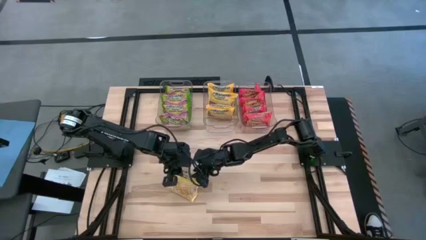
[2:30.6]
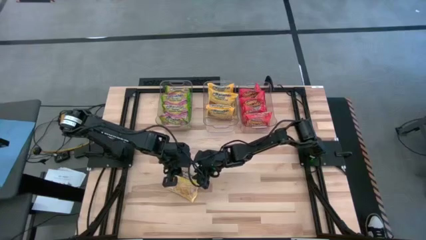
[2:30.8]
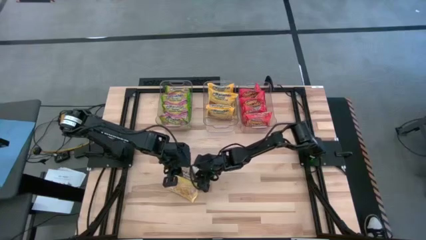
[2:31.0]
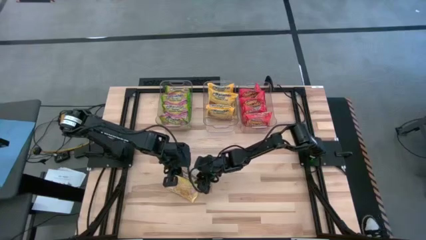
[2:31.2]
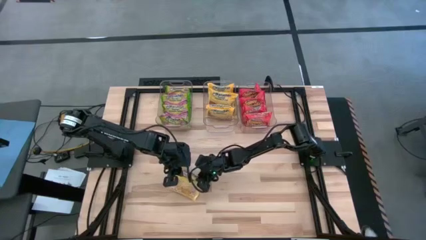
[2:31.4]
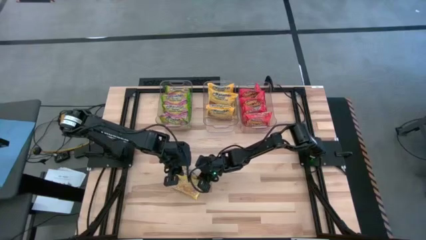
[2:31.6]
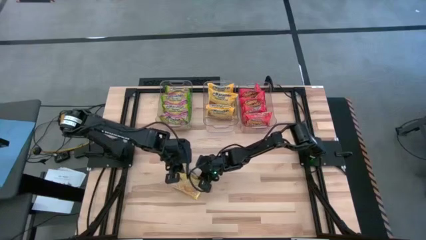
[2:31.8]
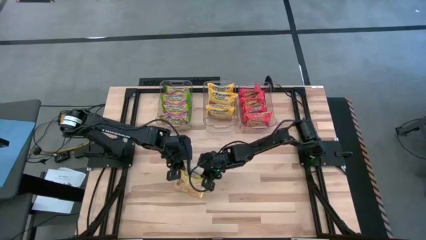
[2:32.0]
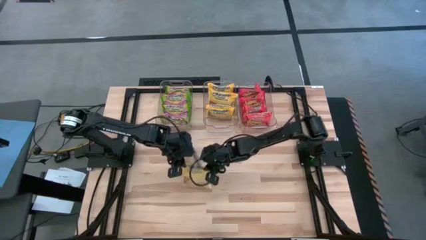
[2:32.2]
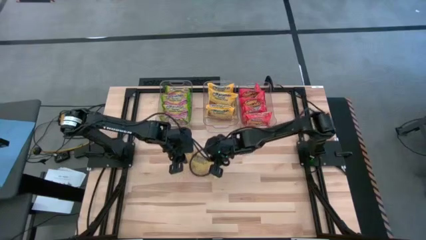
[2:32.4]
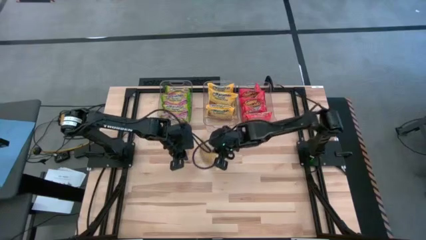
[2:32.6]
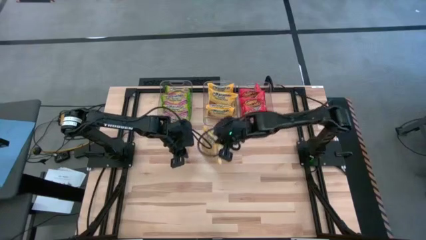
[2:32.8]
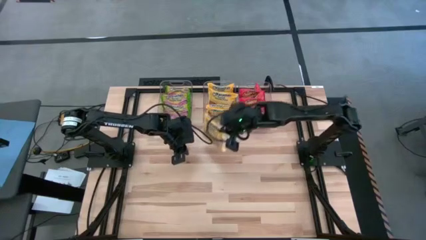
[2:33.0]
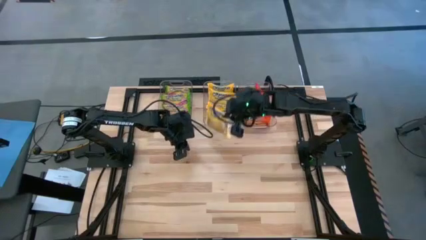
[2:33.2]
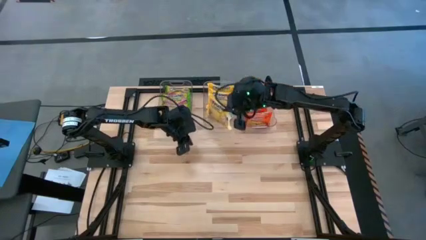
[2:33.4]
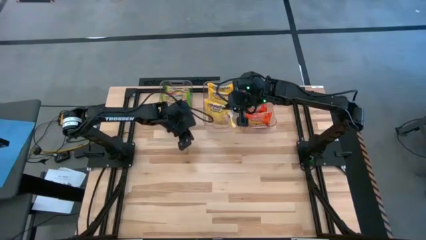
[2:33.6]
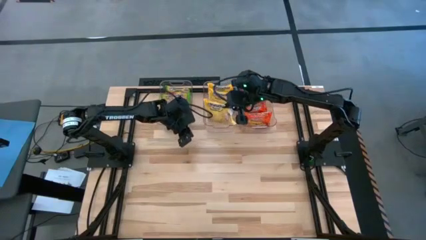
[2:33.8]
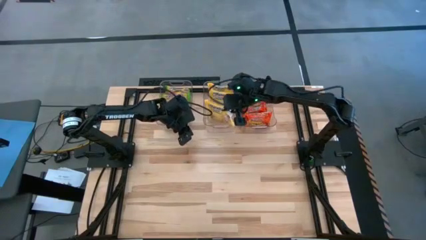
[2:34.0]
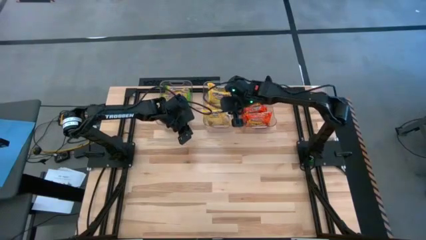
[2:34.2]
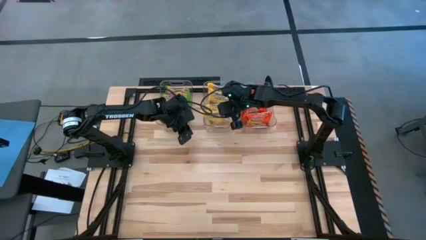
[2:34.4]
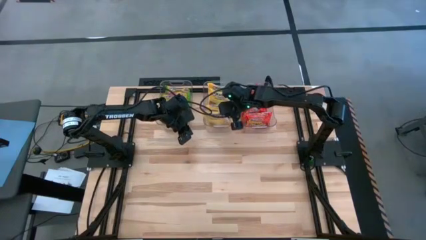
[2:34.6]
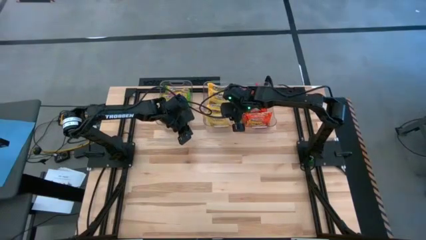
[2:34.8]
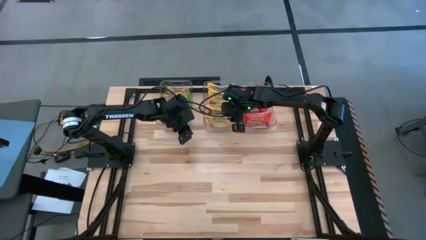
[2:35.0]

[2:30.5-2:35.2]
Task: Sort Maruchan noodles
Put the yellow noodle pack into the middle transparent bin

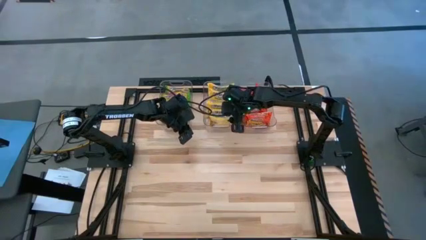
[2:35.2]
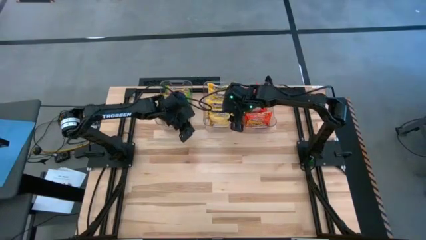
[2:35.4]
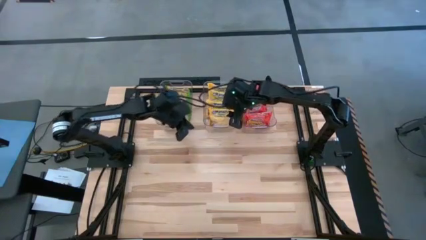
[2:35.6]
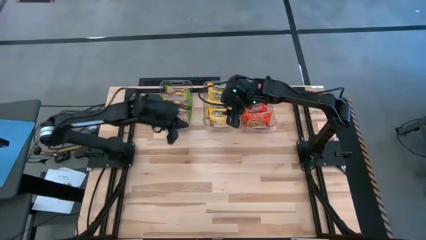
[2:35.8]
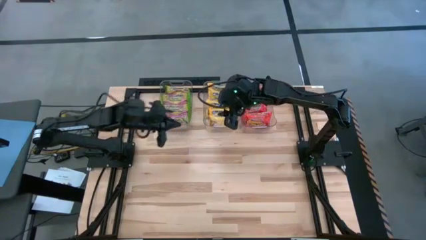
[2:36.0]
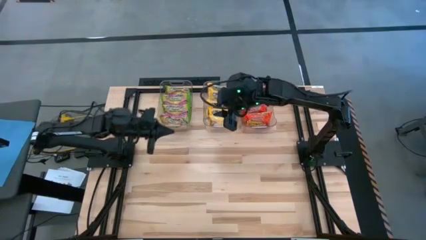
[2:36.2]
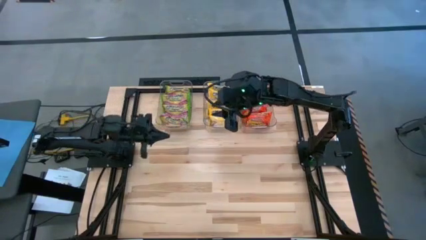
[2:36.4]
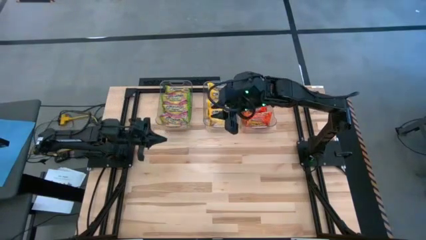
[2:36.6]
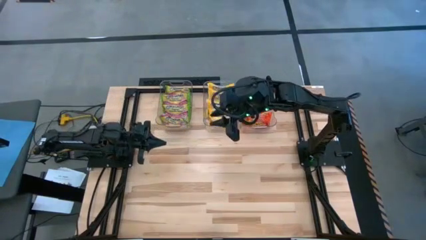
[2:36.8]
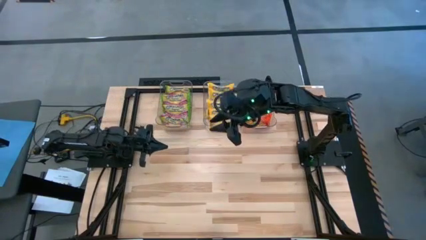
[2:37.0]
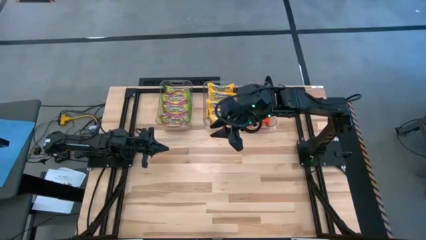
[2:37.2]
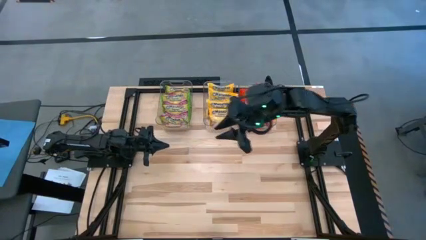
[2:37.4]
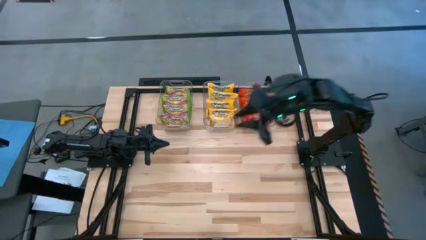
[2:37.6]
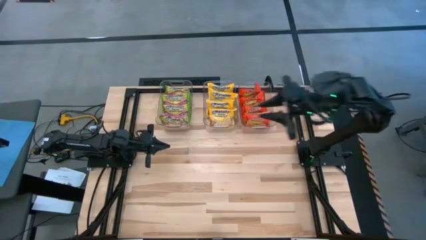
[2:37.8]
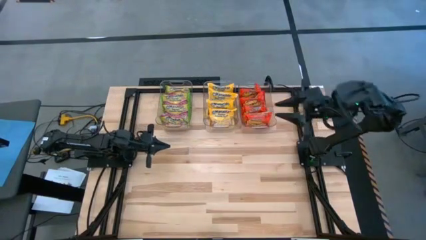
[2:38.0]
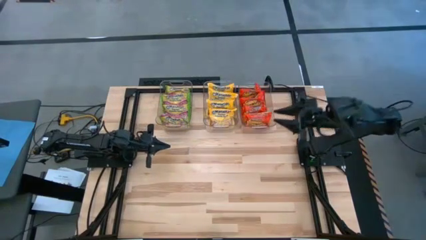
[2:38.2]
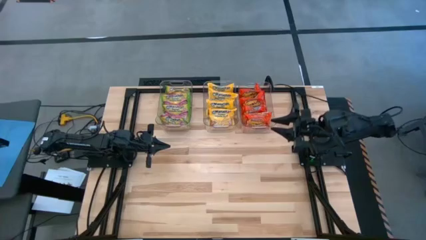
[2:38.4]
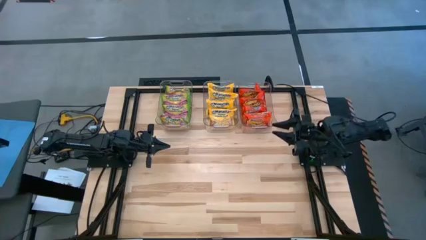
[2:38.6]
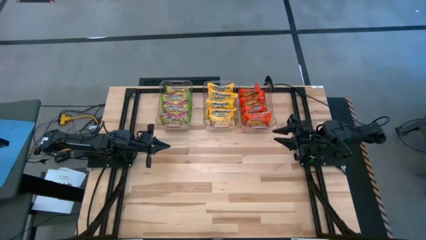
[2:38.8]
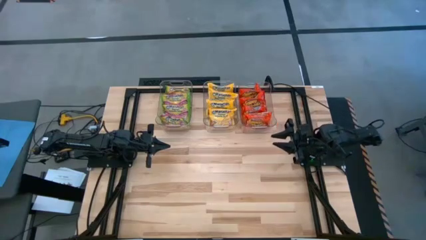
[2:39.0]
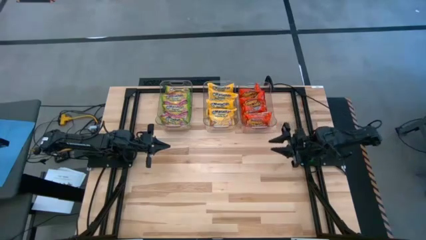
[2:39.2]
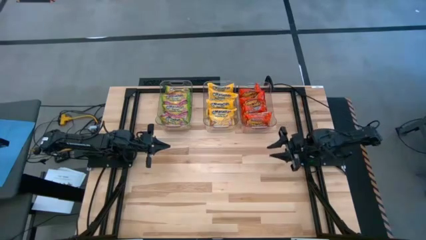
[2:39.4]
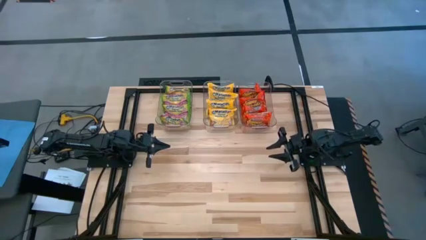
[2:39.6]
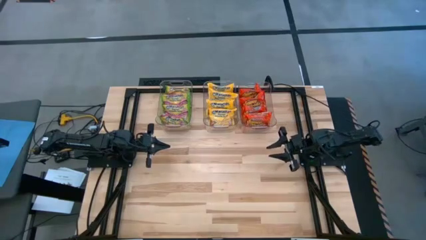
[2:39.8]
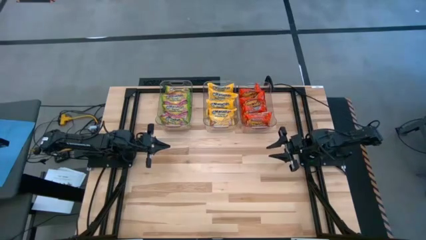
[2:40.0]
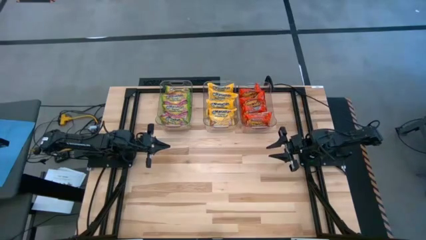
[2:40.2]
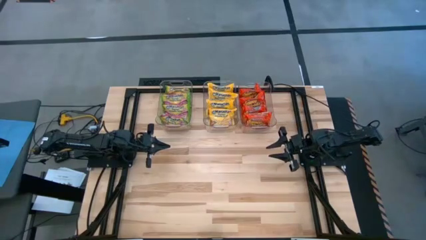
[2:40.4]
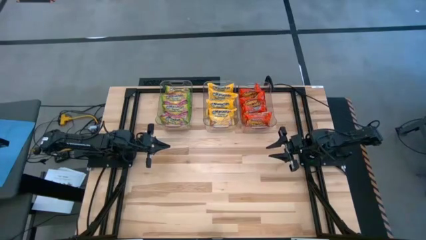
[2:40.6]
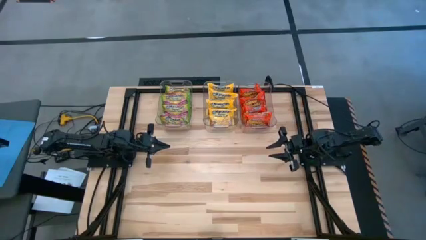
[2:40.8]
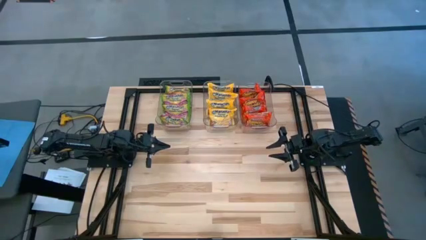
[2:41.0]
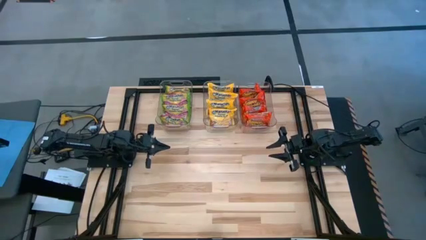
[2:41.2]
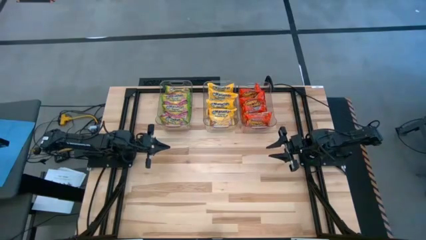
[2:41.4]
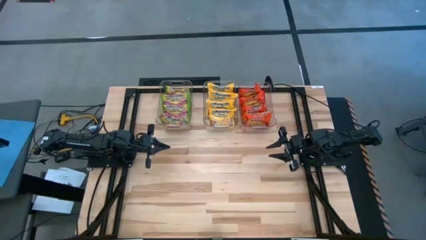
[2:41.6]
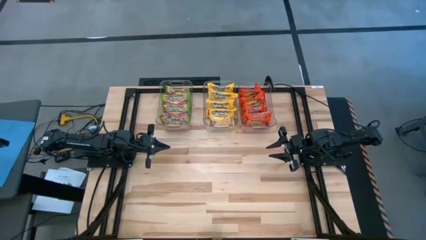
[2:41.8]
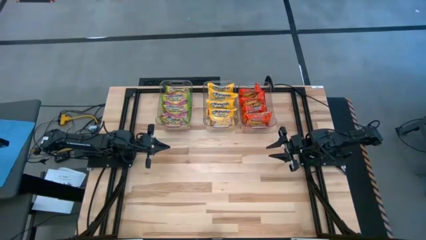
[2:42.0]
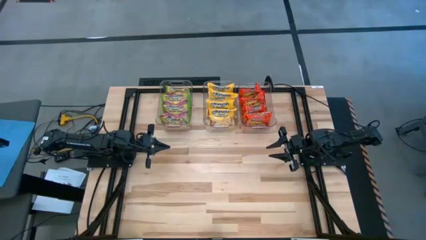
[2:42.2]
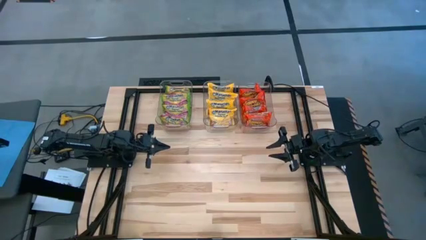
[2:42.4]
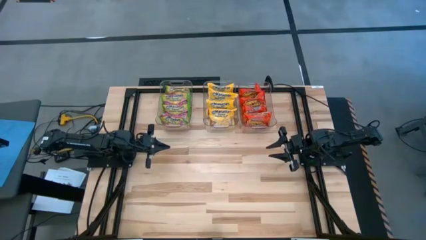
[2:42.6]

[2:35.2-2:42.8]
Return to Home Position

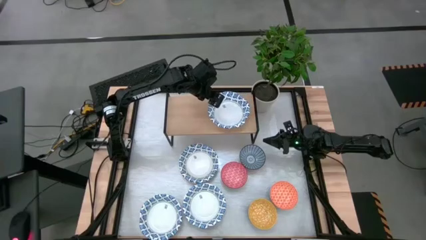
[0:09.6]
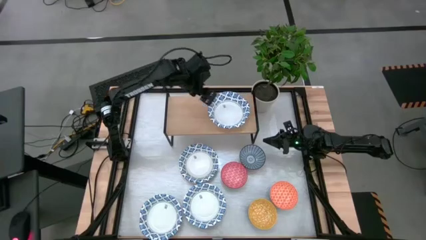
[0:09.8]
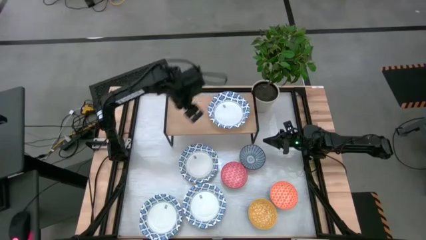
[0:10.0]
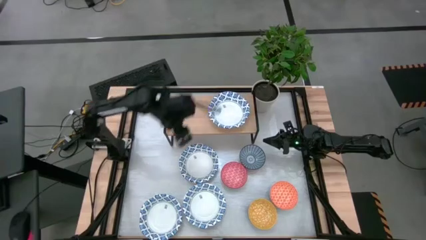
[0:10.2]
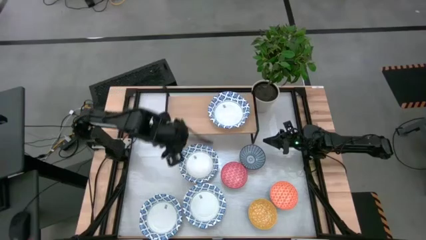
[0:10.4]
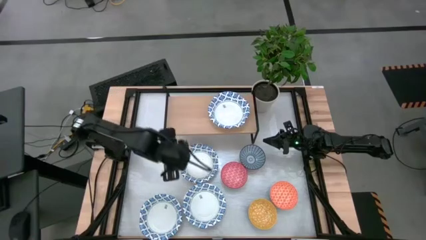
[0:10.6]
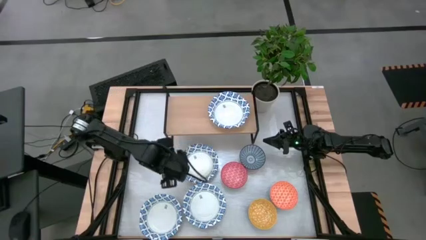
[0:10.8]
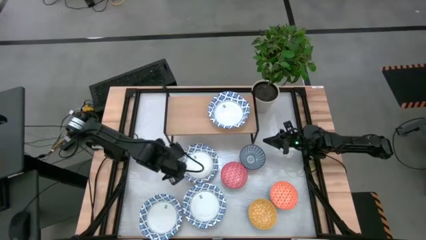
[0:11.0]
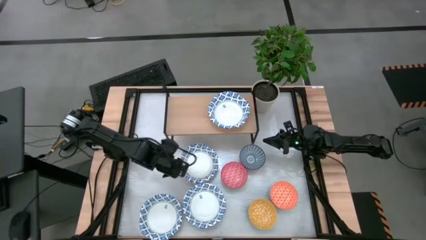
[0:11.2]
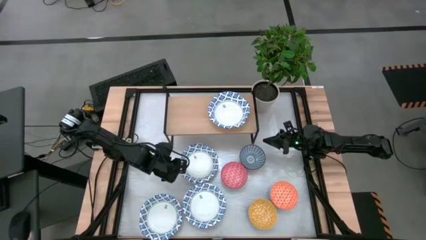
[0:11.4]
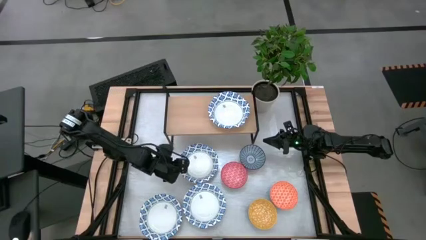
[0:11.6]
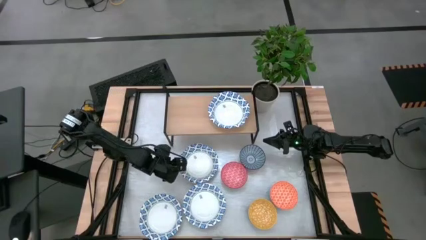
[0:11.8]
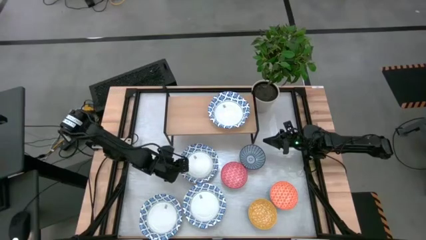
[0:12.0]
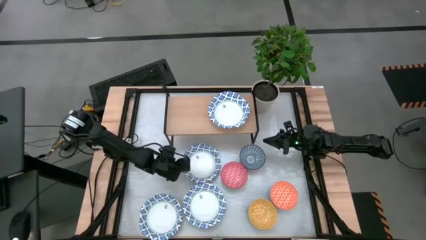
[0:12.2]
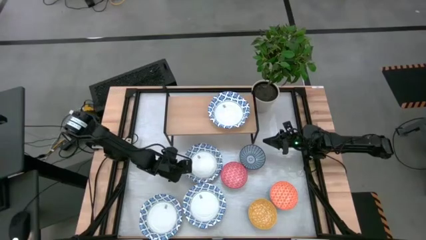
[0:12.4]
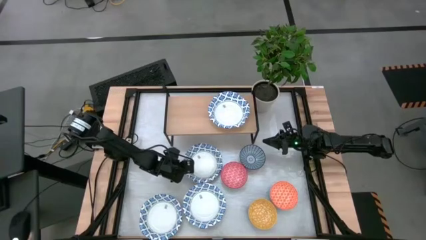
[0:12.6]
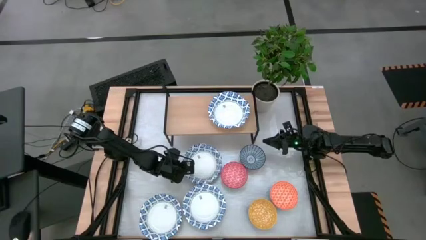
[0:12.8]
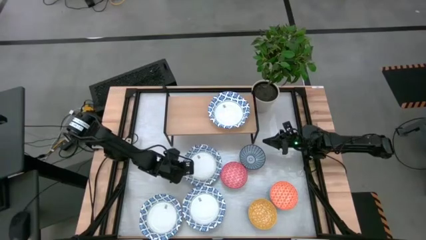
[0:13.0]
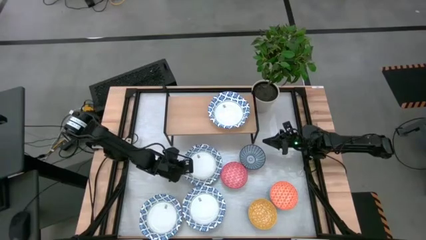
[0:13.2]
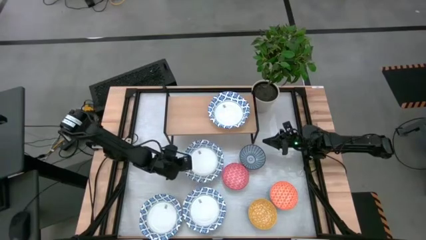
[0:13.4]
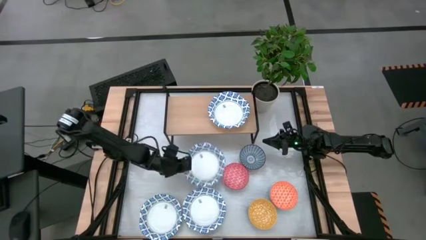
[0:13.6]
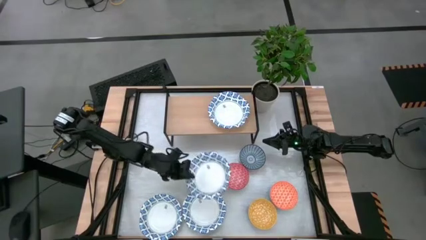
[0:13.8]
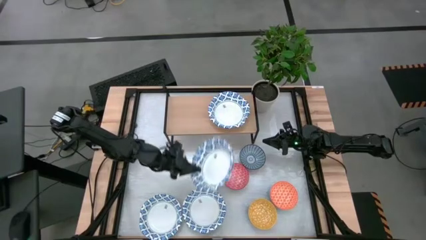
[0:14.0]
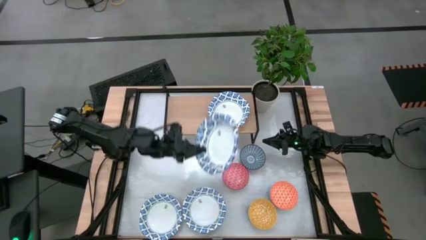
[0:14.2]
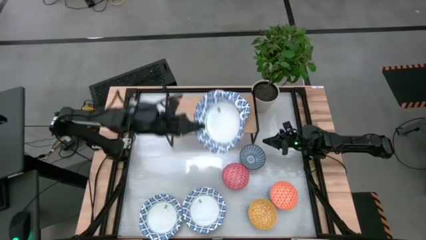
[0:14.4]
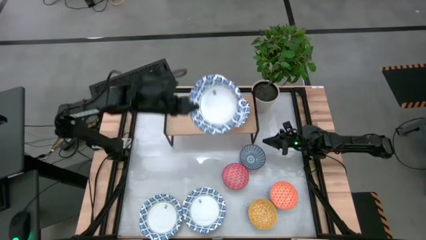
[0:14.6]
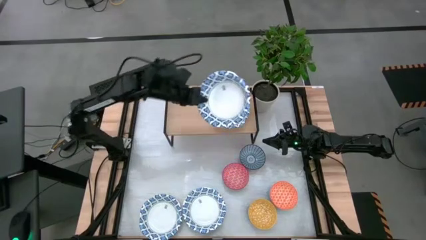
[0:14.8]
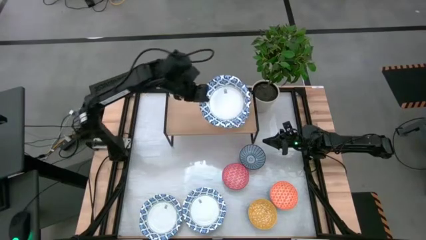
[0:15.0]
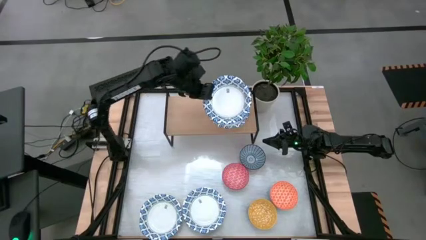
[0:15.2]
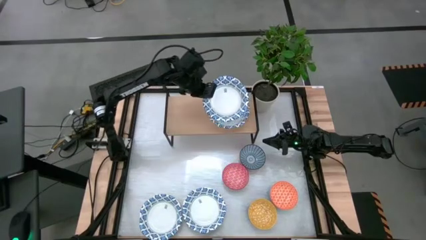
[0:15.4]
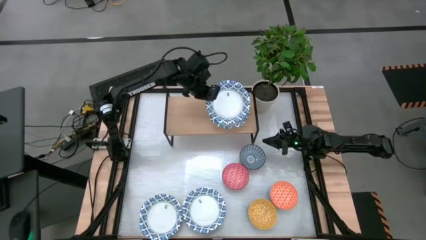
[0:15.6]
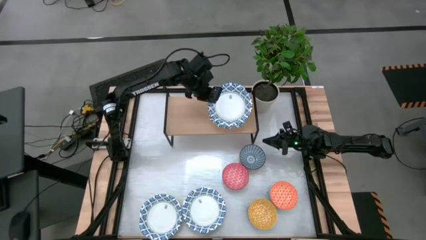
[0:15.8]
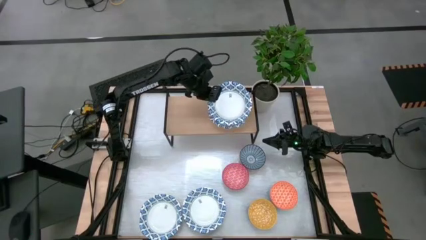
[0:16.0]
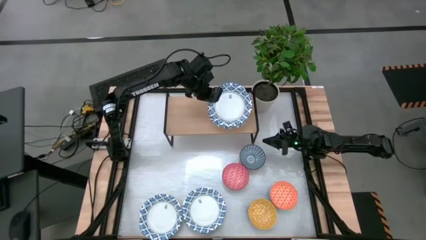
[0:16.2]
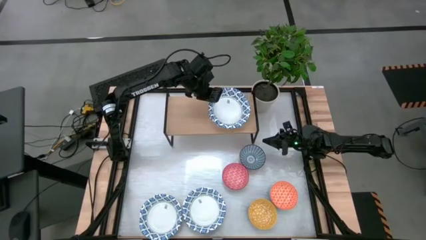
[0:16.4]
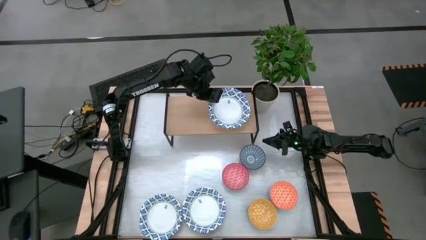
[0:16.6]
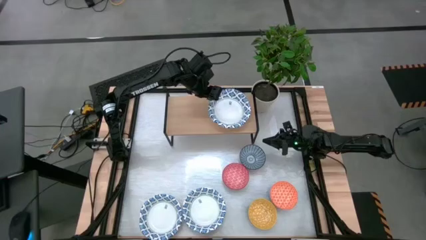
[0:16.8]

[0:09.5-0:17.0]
Task: Place and stack bowls onto a shelf
Stack the white patterned bowl on top of the other white patterned bowl on the shelf
